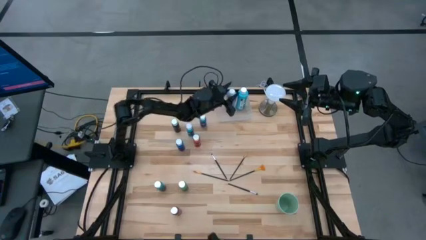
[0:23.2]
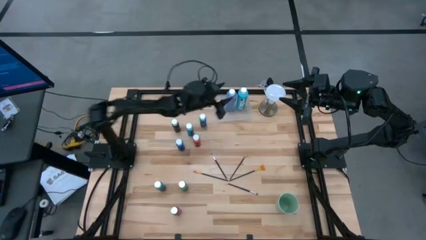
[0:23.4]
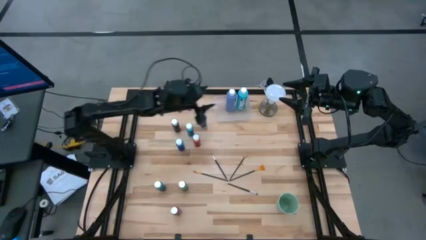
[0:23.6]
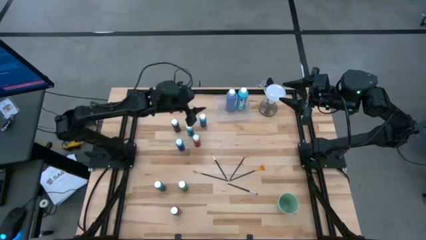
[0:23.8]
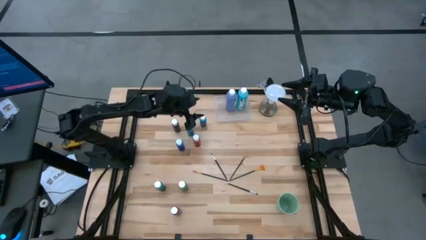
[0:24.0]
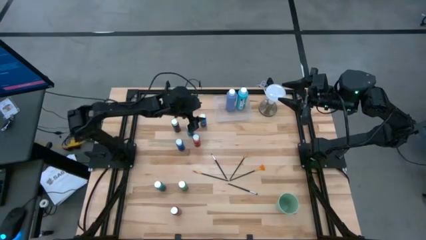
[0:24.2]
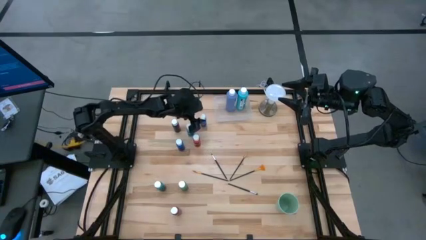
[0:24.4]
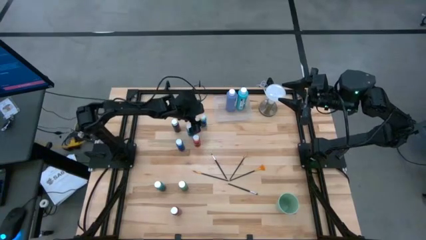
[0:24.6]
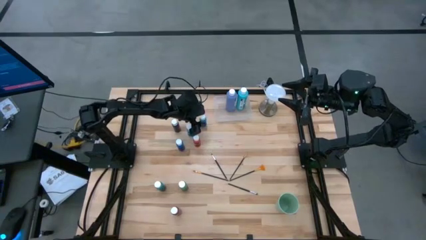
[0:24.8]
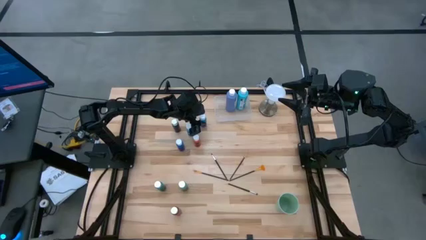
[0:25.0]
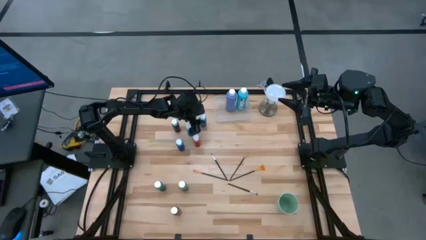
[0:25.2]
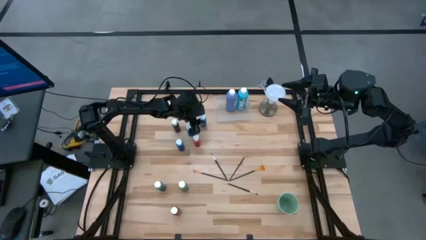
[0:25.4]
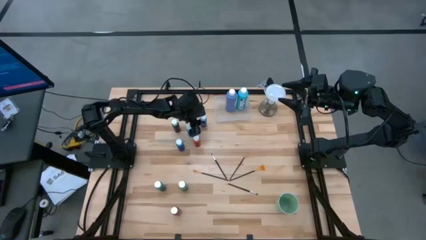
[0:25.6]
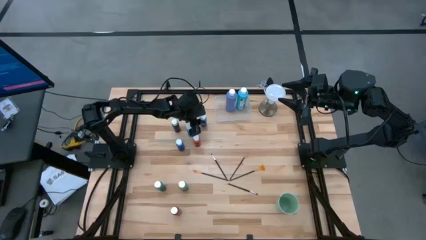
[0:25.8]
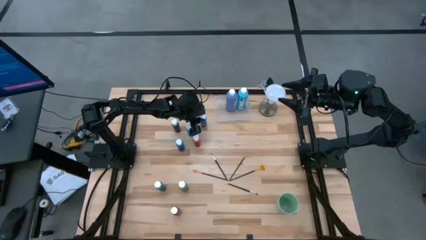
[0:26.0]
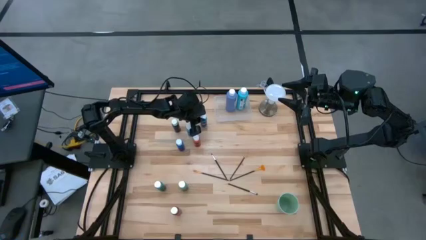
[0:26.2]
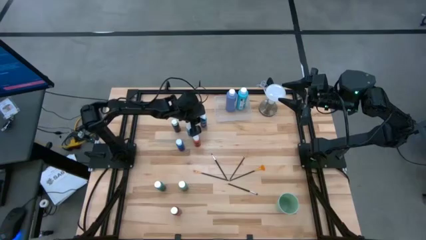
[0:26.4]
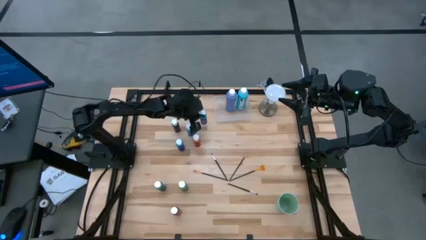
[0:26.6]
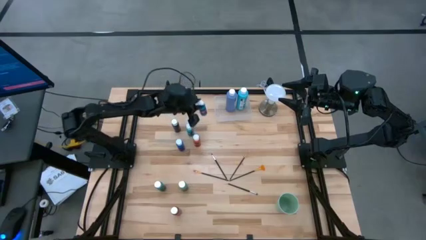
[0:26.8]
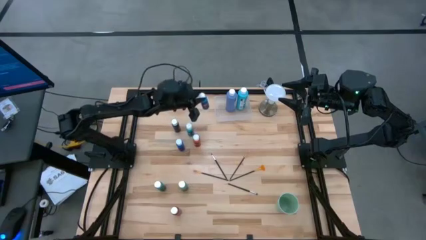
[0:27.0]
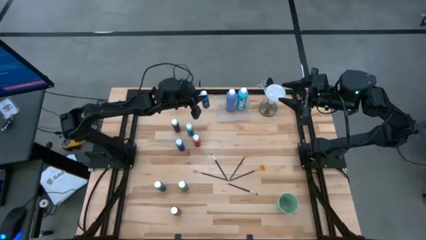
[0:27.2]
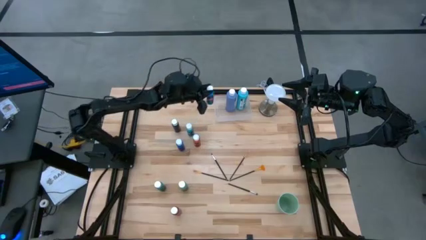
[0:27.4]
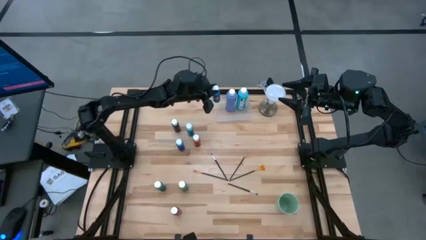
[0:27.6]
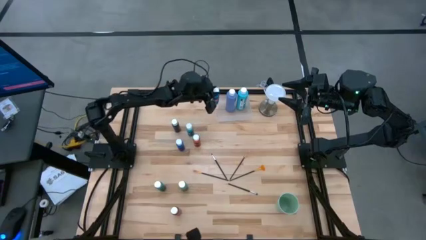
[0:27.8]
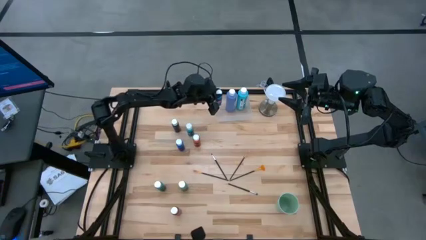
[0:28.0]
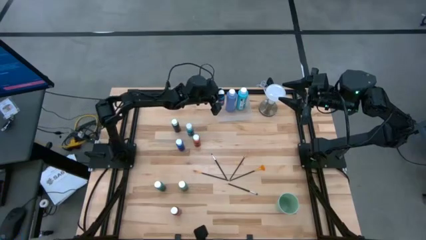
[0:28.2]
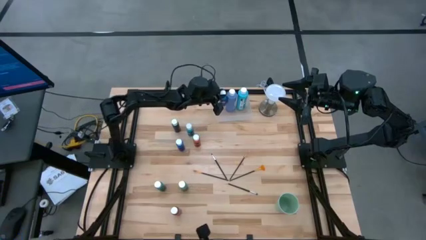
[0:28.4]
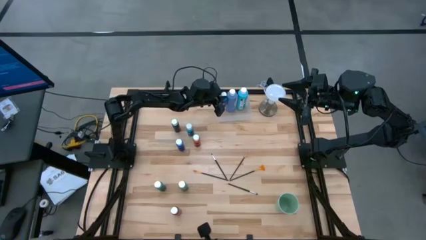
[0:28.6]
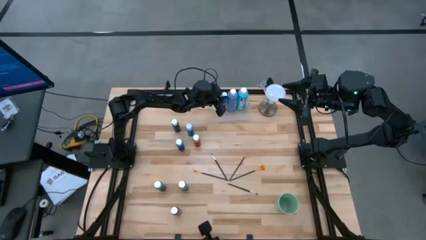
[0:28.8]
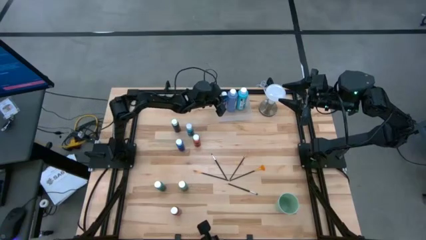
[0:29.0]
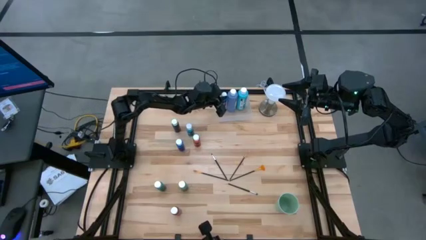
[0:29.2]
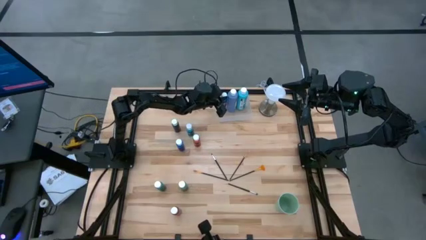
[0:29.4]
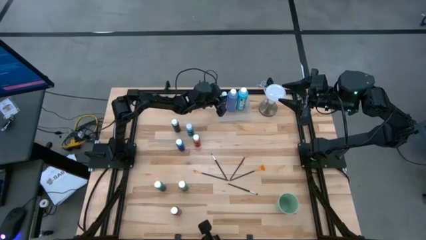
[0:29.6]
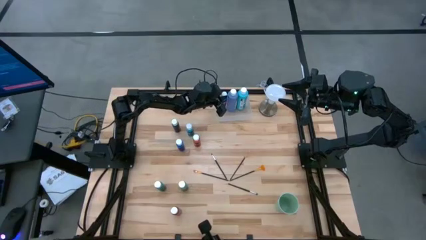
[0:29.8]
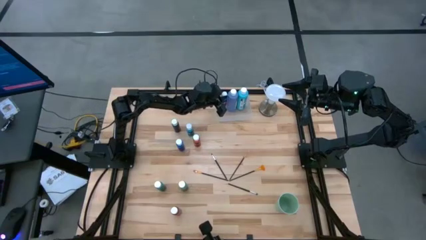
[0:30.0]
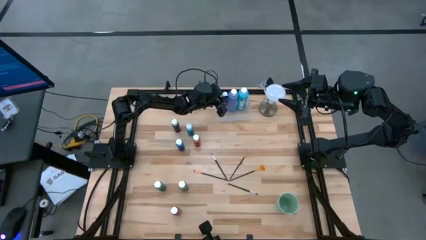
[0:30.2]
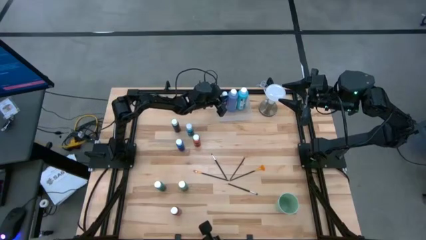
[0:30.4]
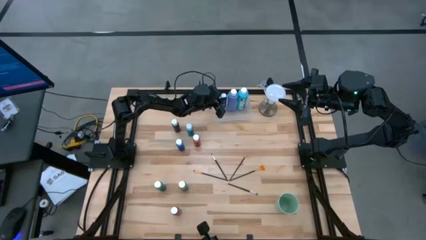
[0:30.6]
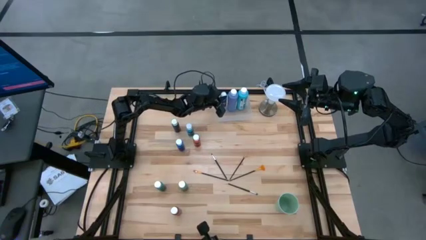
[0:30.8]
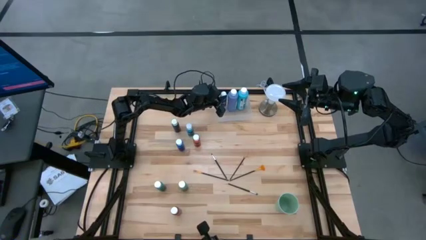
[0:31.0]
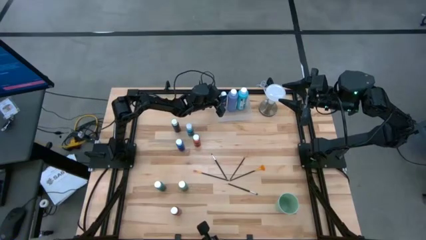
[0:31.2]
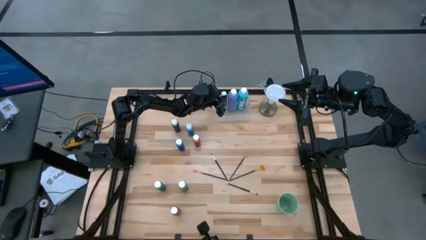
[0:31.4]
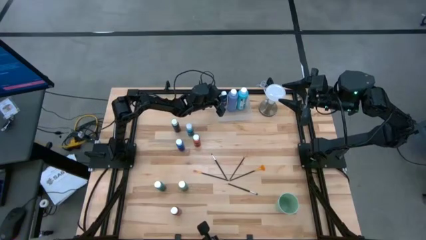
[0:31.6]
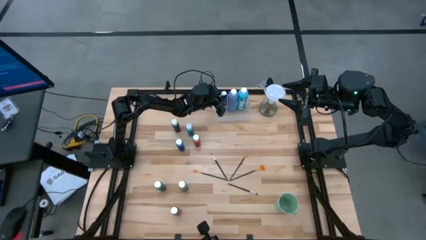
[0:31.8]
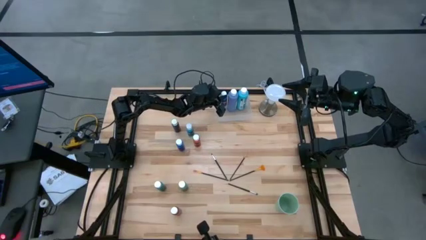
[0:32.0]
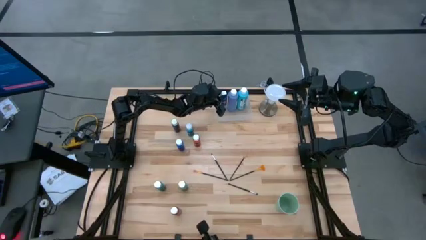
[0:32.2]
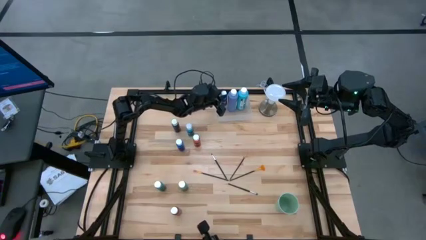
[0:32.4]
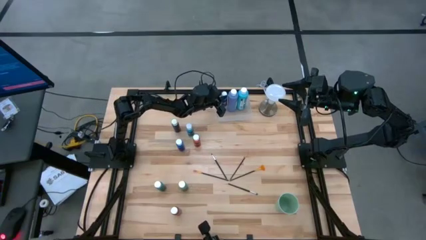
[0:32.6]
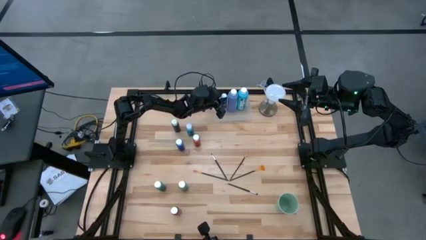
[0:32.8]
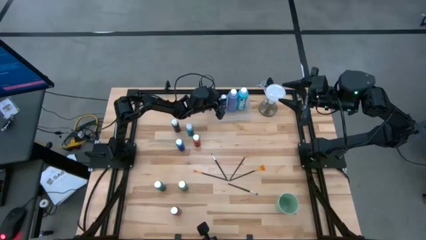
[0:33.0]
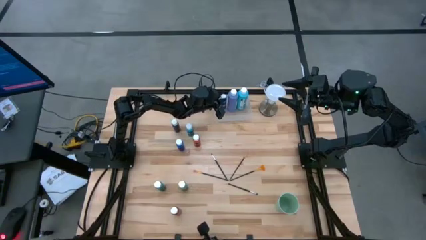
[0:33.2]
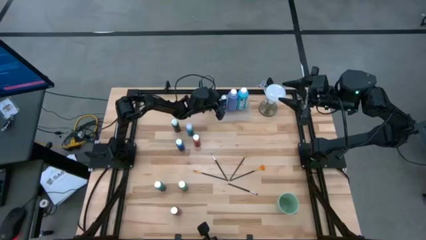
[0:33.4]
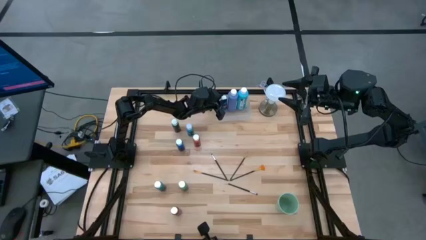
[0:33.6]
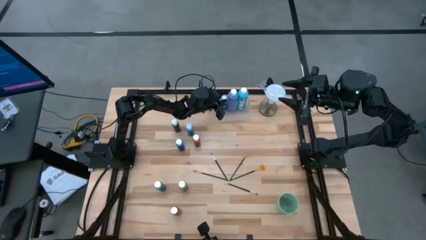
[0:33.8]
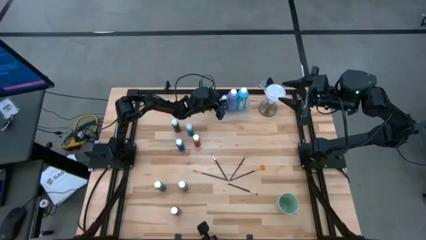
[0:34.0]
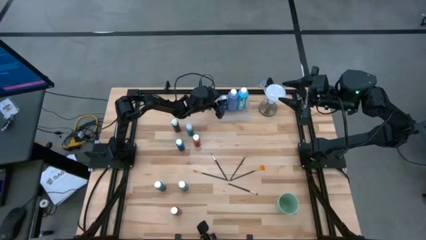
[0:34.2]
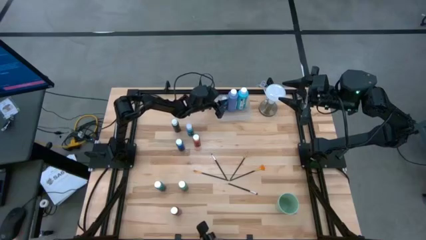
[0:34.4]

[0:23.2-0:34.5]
Task: Pick & Place Paint Supplies
Put the top blue paint bottle into the transparent bin
